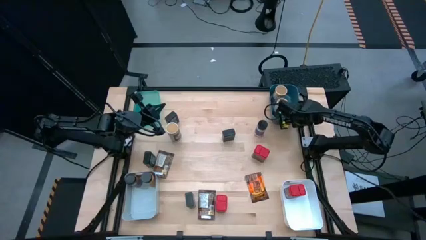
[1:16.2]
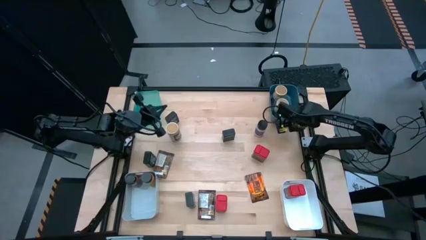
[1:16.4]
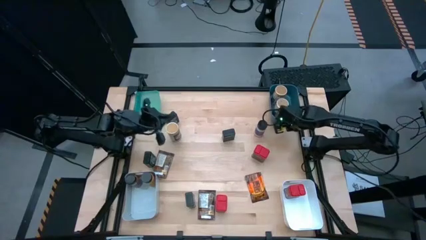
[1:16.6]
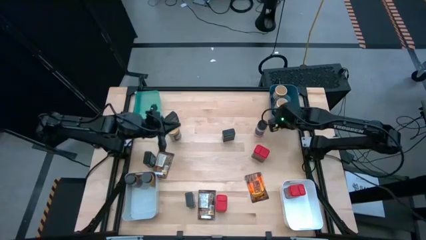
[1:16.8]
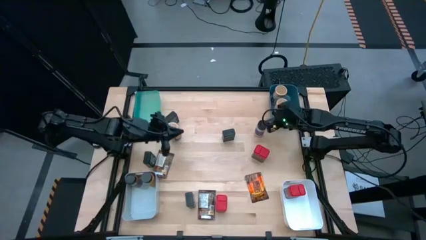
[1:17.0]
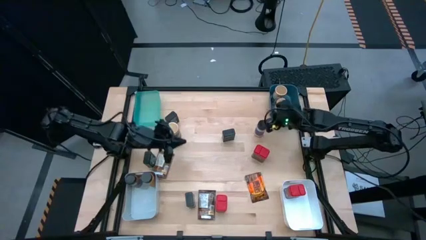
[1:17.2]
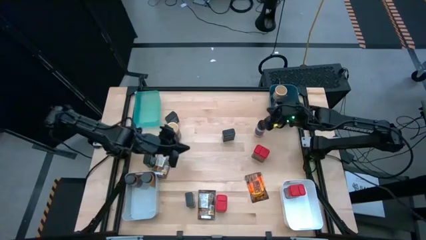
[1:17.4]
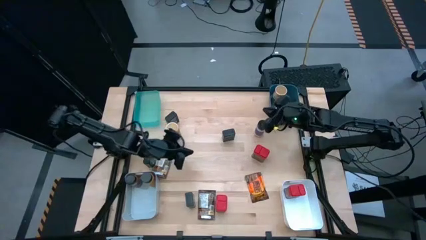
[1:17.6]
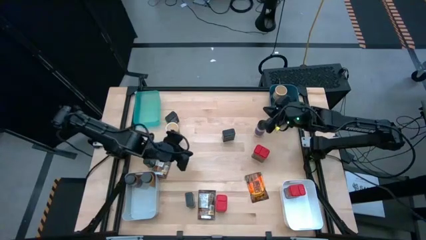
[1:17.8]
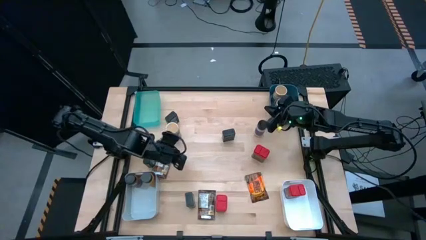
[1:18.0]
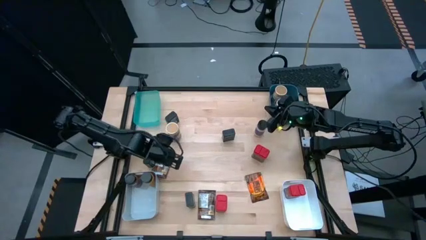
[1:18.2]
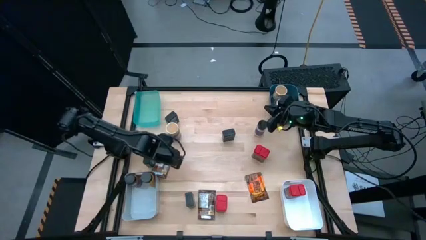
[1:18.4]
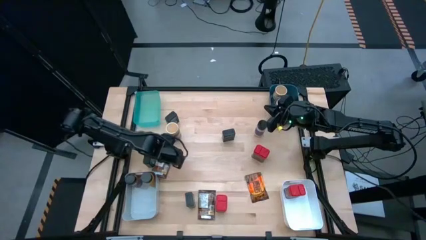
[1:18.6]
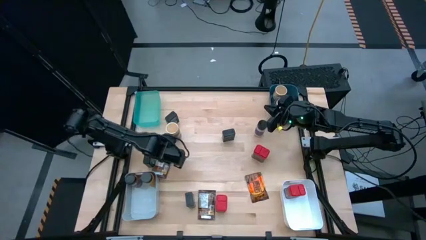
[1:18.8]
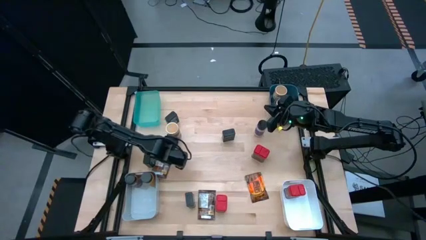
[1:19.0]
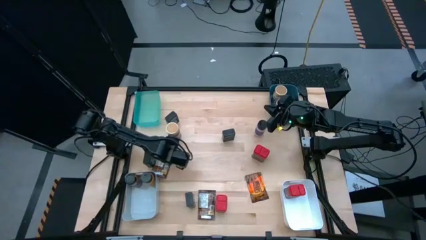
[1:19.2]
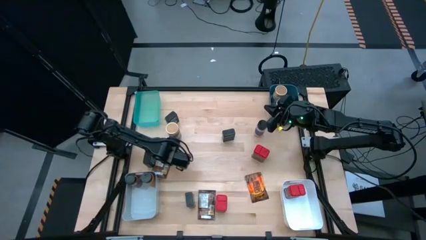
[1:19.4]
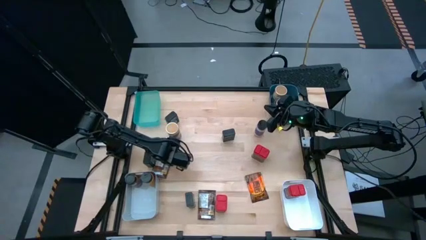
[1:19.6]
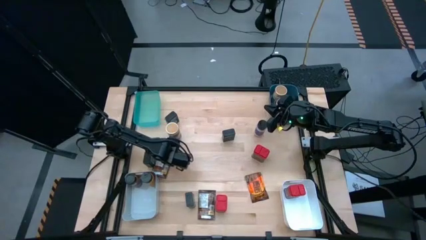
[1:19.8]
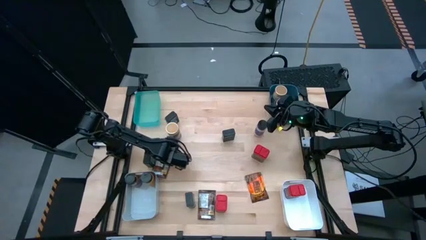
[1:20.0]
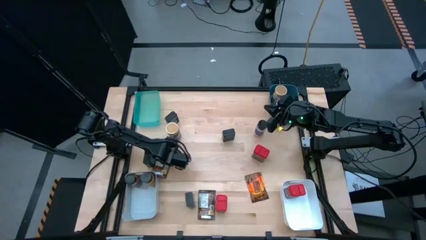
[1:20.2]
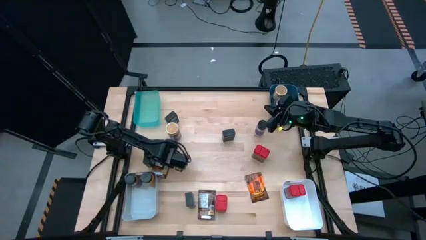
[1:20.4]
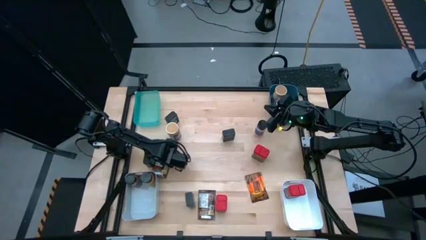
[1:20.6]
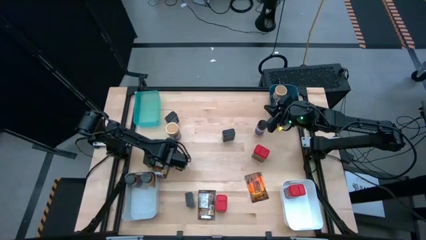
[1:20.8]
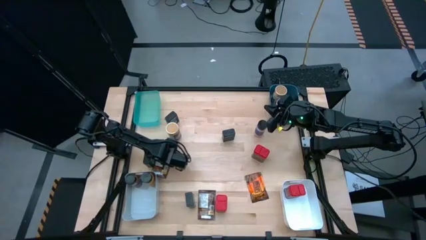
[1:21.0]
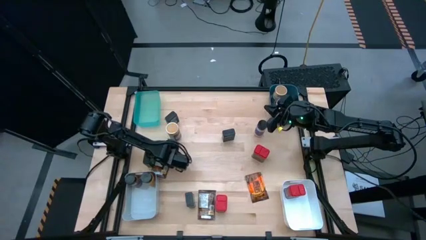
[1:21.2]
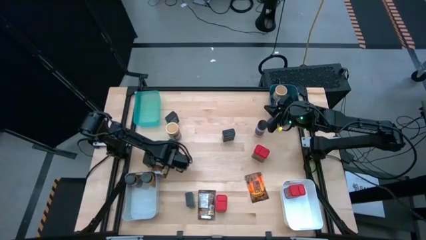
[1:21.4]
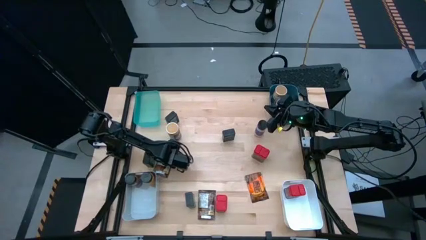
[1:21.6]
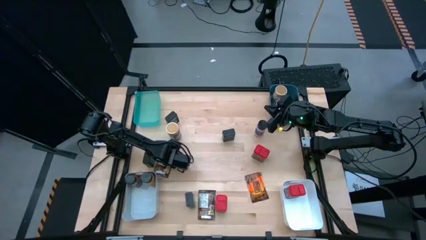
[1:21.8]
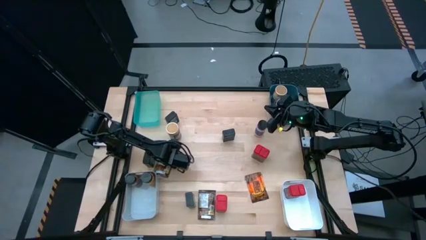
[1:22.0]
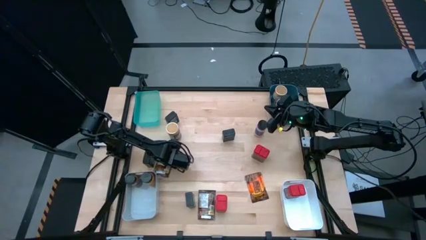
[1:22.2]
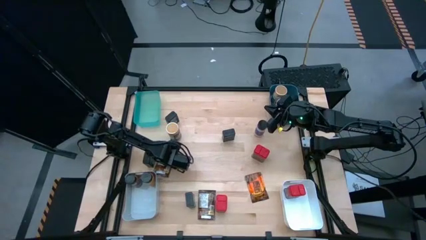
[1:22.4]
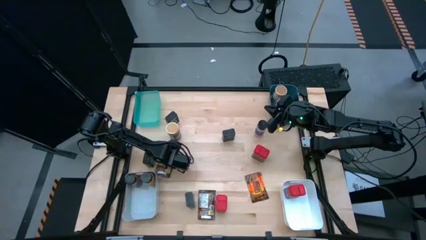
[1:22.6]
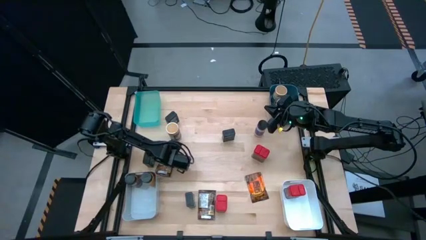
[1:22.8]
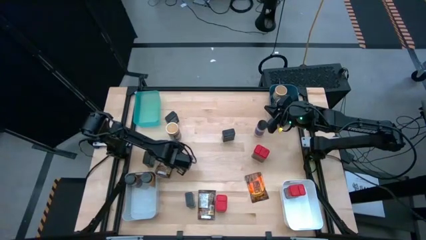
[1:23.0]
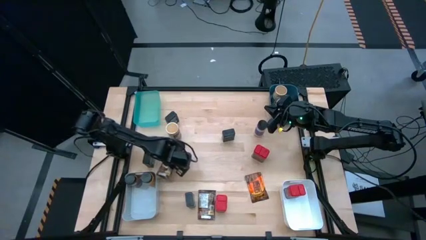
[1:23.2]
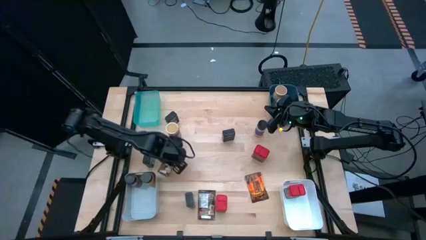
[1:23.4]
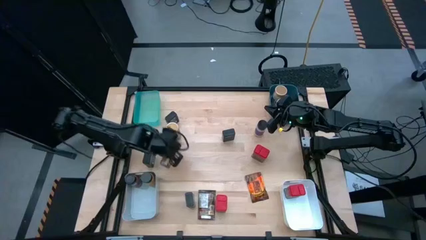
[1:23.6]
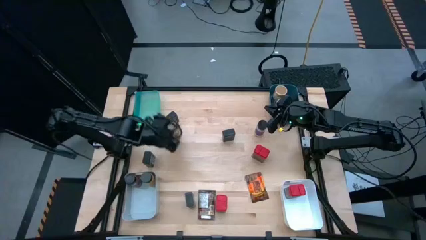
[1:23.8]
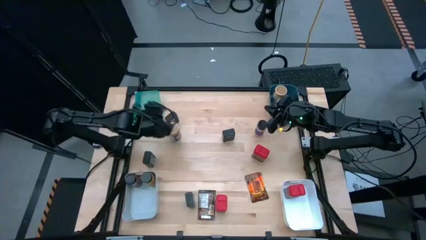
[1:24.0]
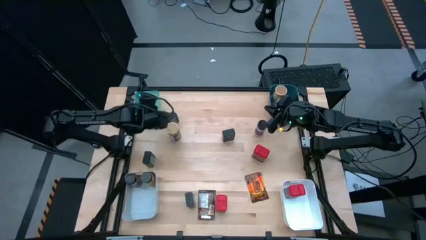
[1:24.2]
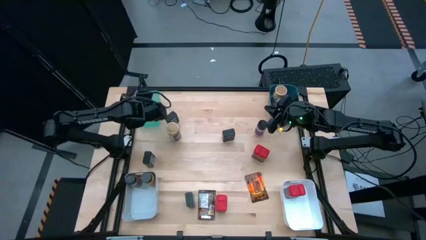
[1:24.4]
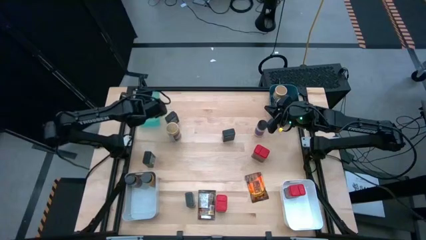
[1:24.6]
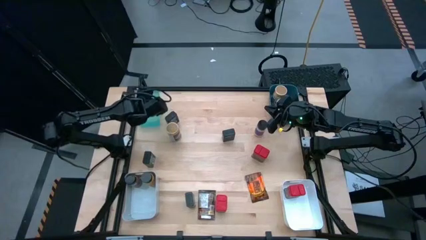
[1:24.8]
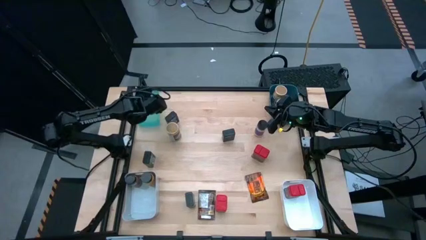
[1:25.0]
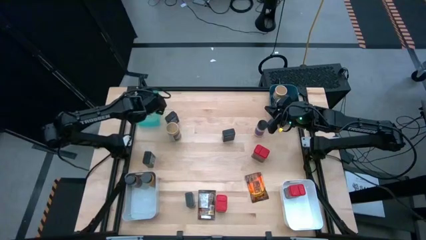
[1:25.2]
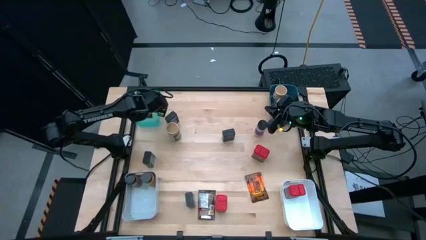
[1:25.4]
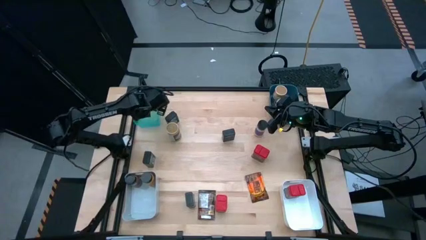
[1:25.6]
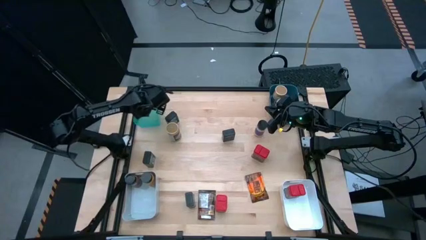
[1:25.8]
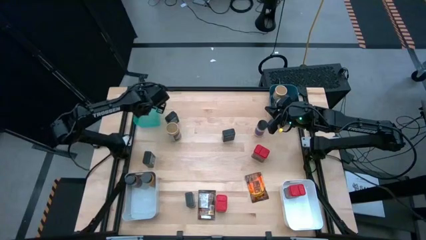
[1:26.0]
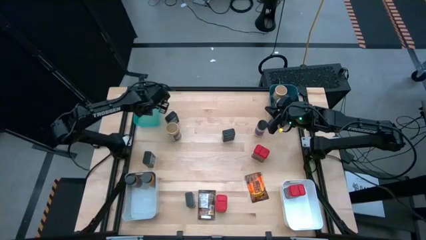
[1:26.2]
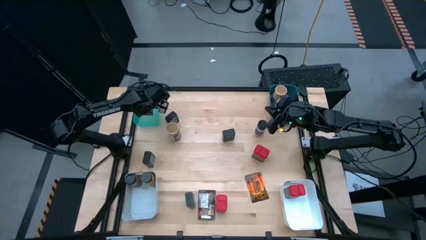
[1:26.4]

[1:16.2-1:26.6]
Task: Sort spices by type
Put the left brown seasoning pack into the light green bin
